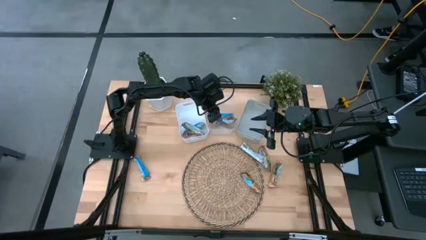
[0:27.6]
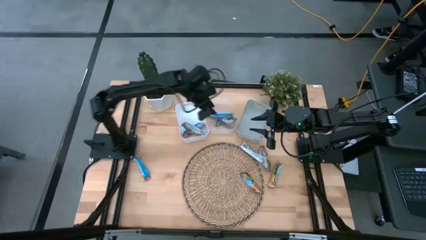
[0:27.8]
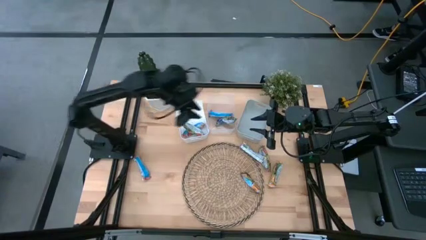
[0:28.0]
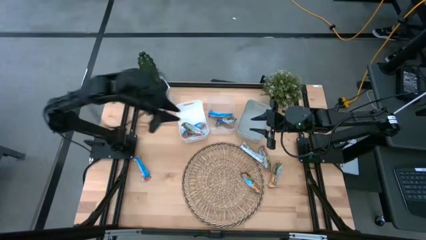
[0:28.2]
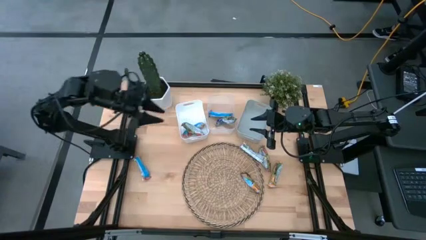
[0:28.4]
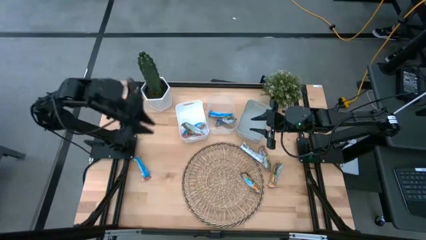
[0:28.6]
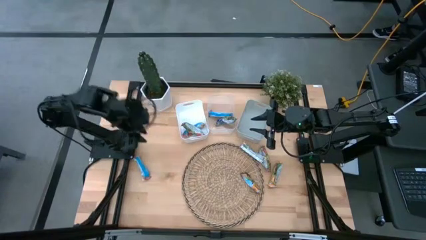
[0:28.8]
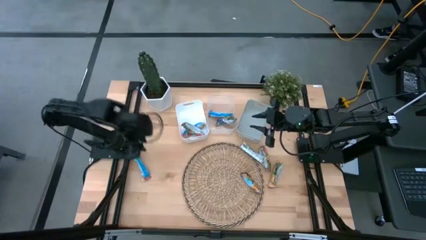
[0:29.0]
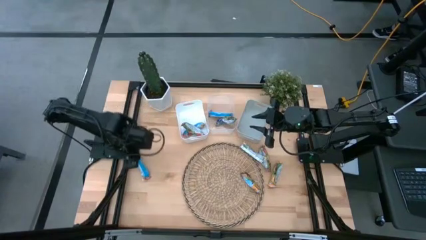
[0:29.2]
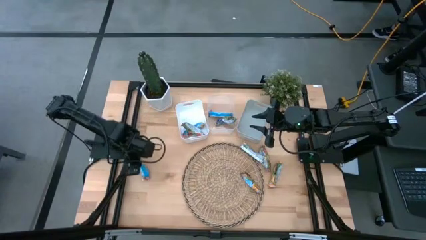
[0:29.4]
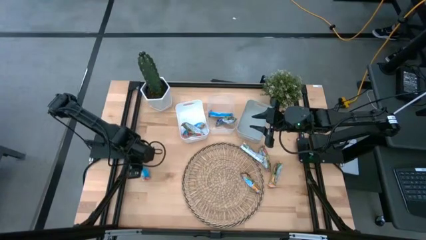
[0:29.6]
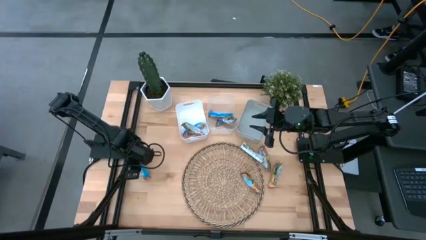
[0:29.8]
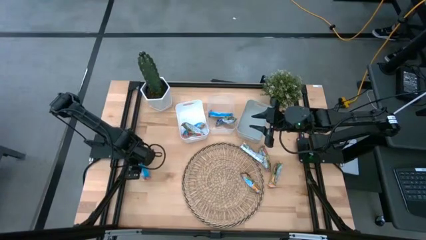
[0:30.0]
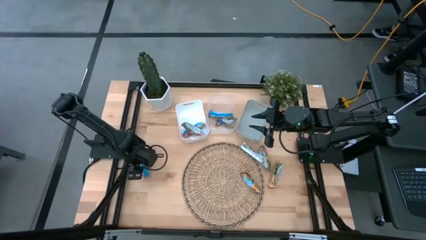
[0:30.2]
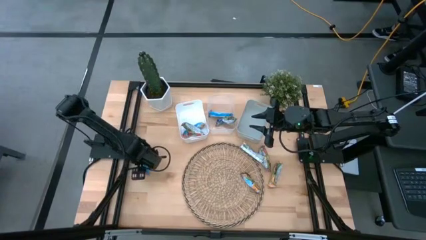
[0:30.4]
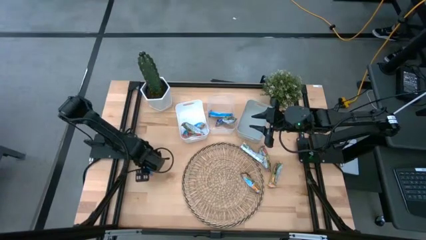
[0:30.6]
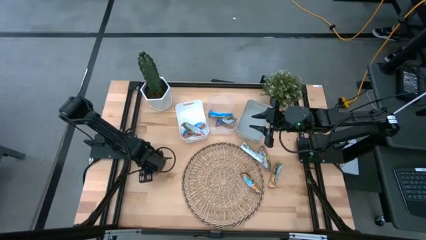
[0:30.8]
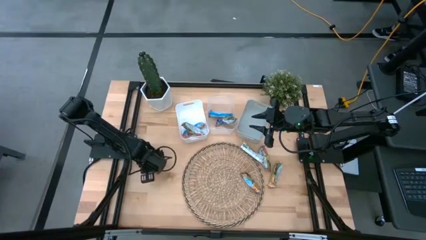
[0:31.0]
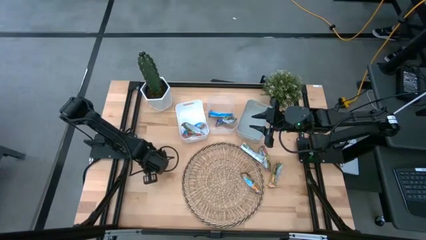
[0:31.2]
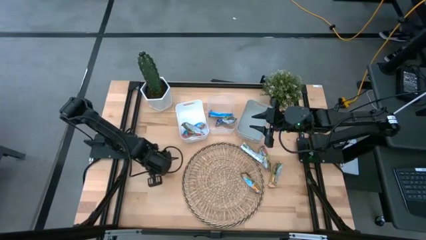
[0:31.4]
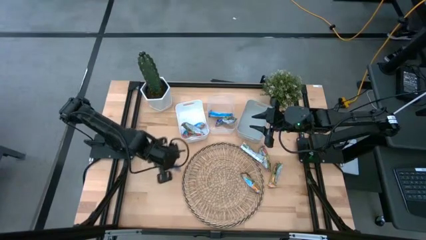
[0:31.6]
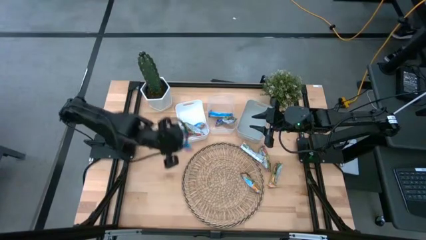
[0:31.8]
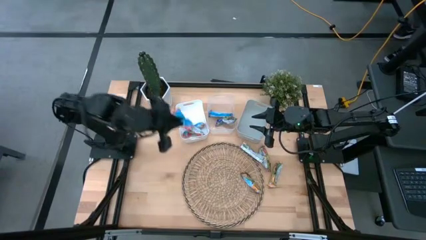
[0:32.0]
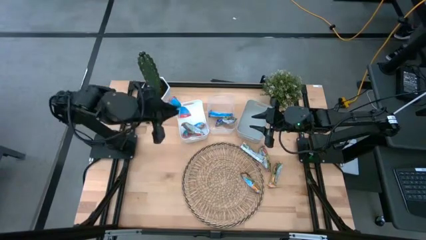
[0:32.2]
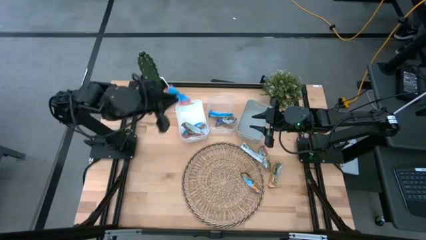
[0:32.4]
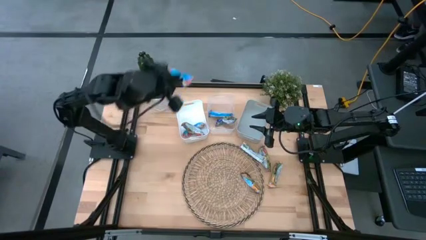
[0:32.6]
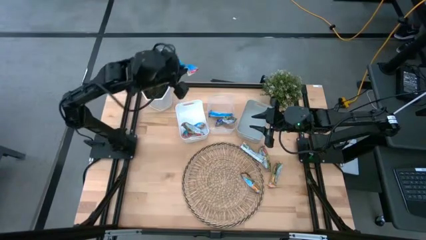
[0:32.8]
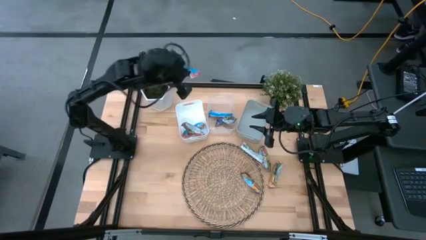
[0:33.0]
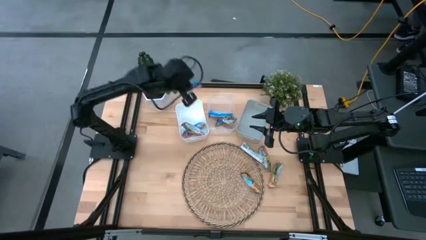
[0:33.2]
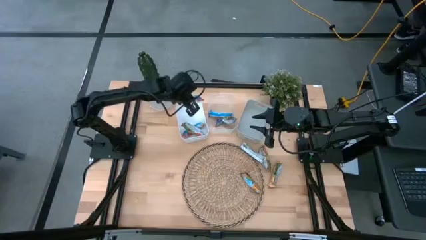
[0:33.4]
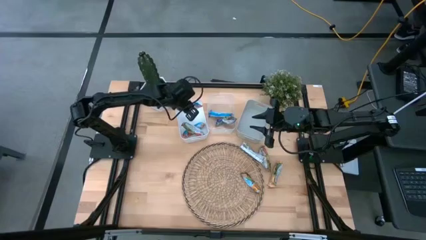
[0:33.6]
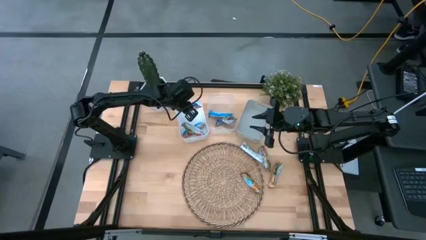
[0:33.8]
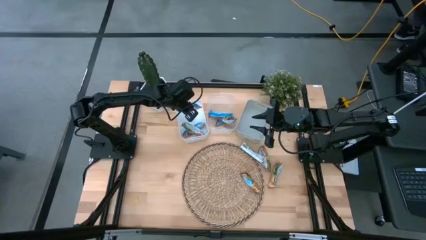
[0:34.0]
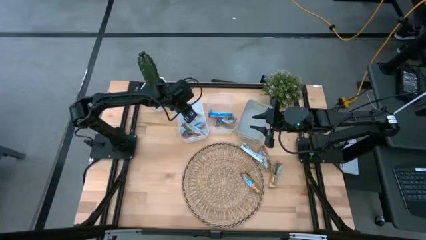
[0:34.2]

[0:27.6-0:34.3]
Task: Pick and place Granola Bars by type
Put the red granola bar into the white bin

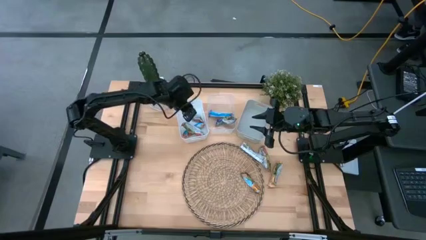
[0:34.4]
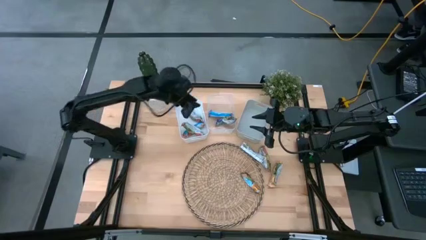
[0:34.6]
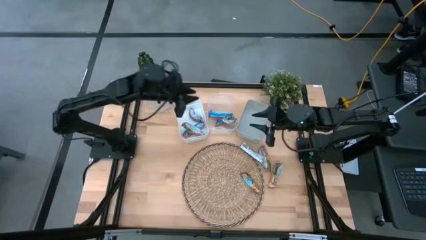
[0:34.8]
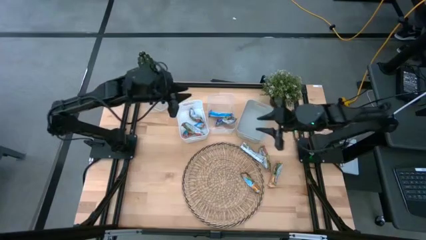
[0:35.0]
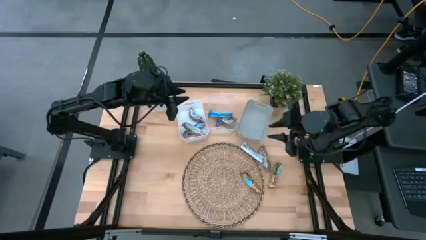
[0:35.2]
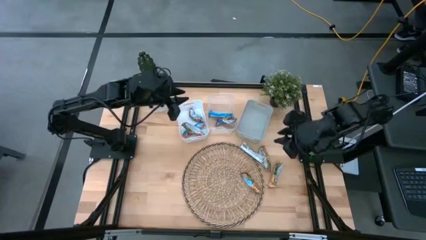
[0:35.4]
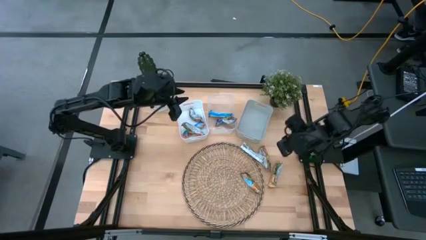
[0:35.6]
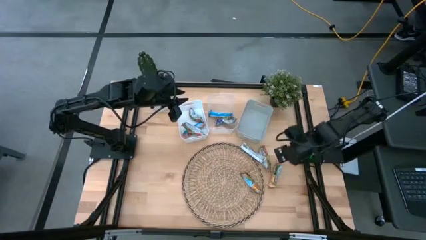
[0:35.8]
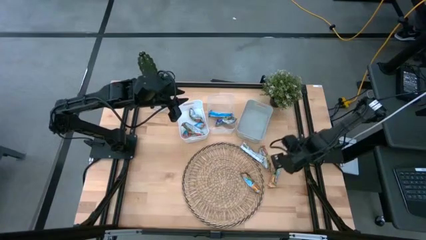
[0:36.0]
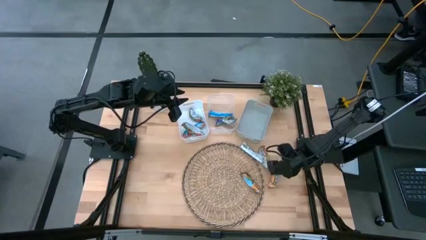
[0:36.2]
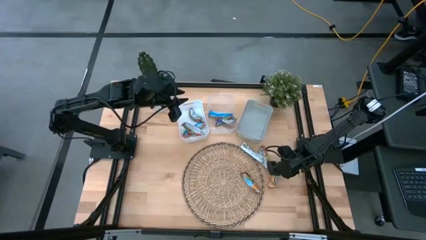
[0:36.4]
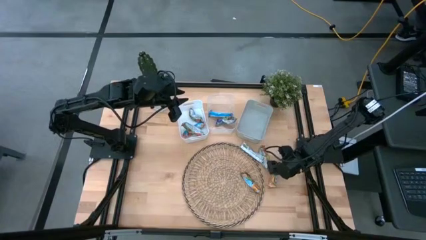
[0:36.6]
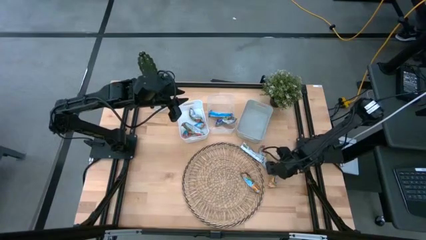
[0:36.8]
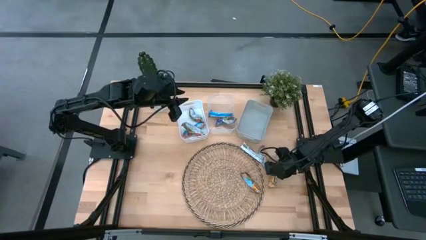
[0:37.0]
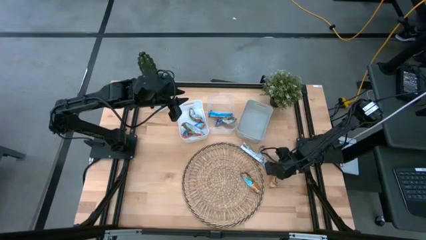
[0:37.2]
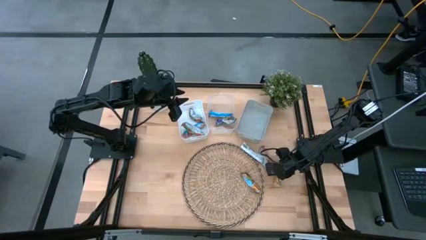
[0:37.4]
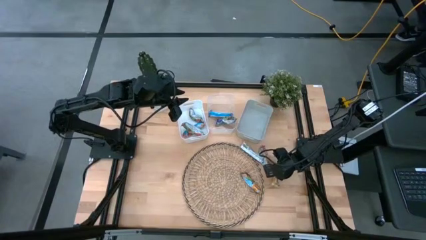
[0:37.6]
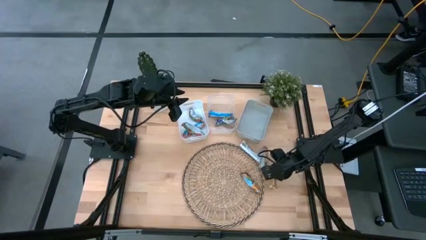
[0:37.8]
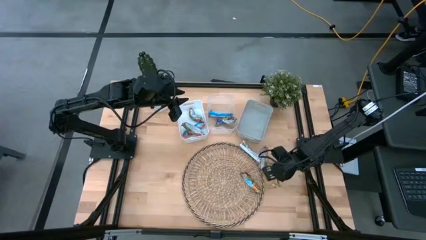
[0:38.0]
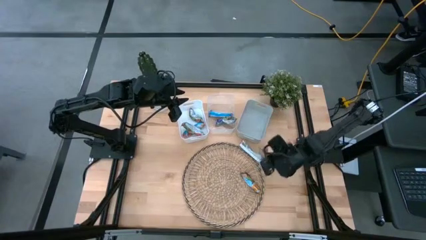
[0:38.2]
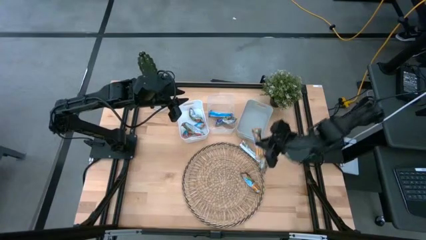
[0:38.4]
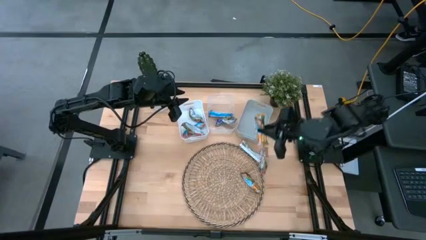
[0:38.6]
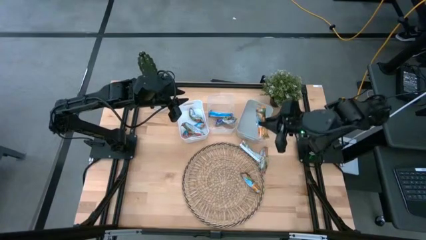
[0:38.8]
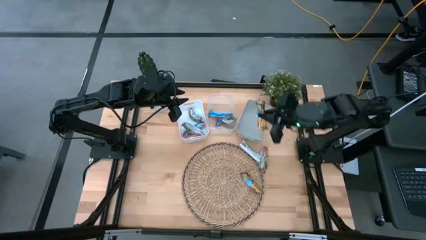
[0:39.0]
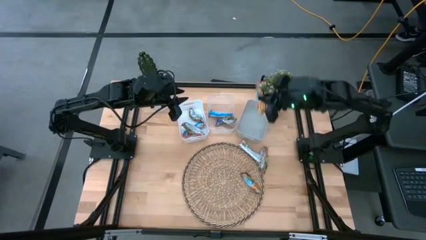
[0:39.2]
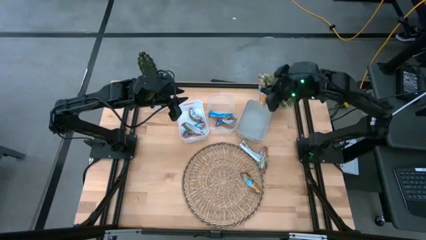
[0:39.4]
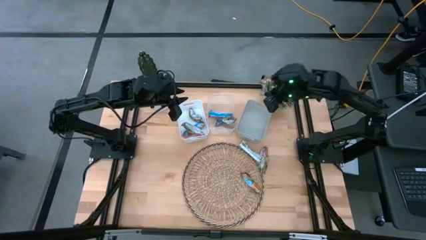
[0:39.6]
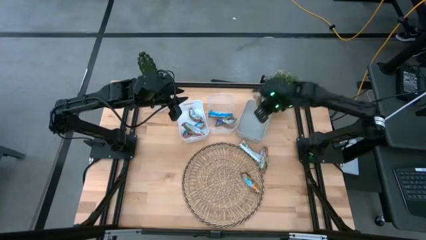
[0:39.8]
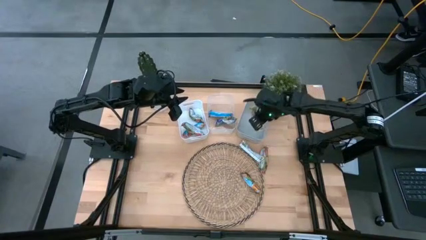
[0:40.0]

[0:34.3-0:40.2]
Put the yellow granola bar into the gray bin

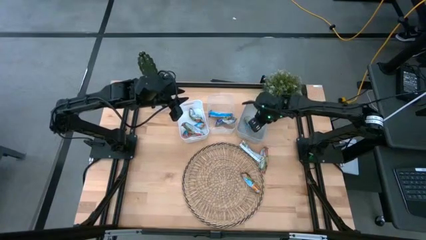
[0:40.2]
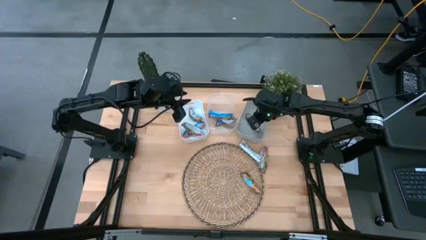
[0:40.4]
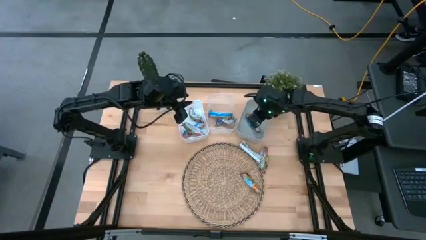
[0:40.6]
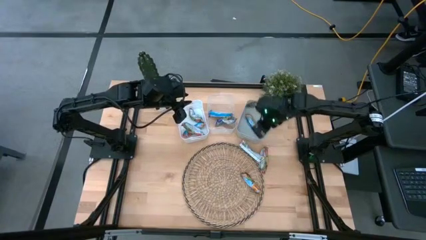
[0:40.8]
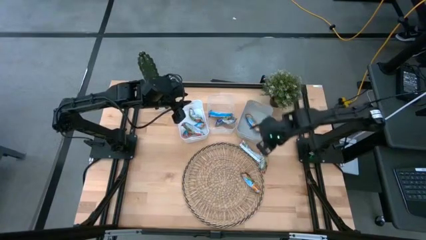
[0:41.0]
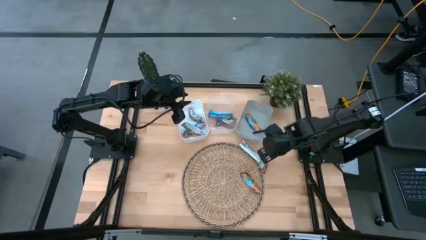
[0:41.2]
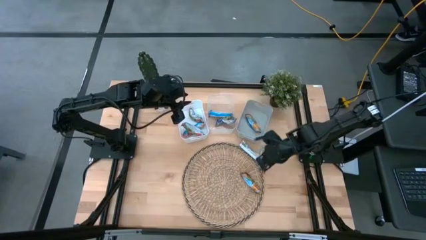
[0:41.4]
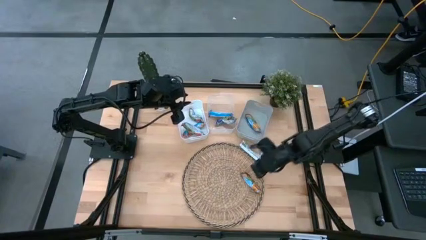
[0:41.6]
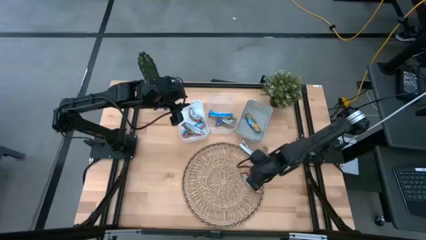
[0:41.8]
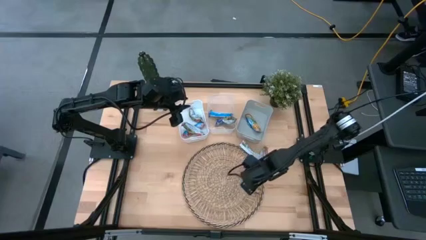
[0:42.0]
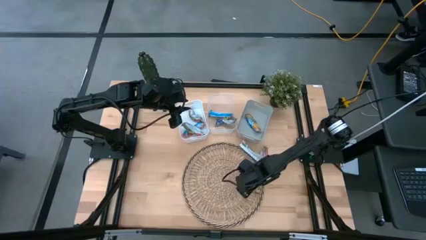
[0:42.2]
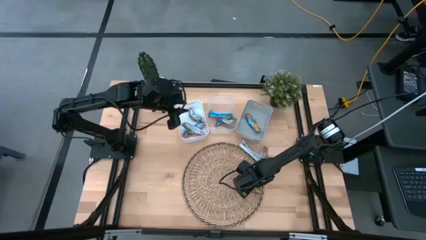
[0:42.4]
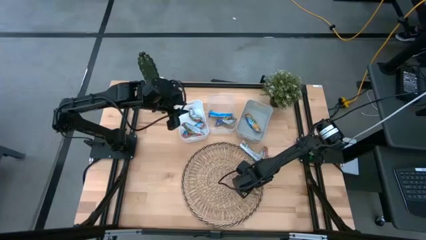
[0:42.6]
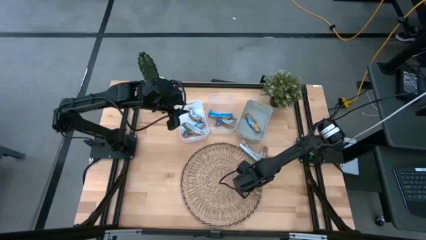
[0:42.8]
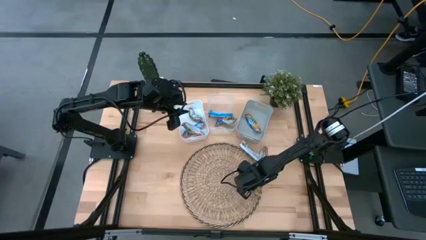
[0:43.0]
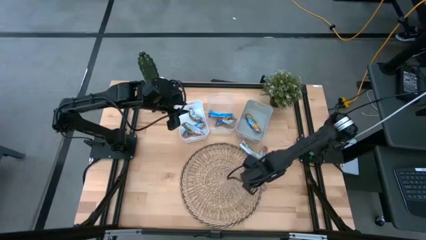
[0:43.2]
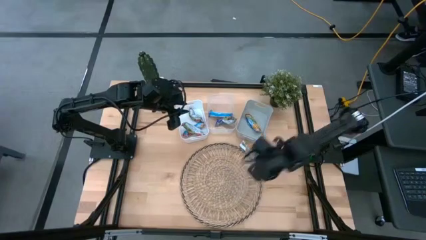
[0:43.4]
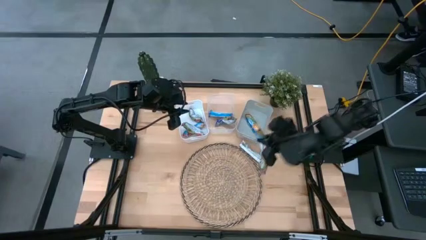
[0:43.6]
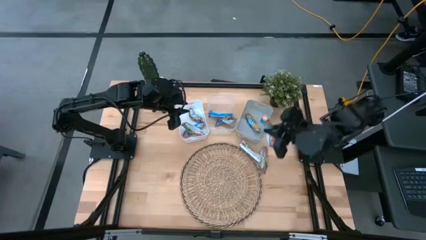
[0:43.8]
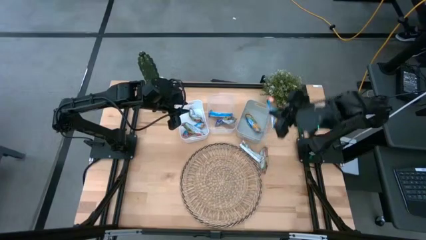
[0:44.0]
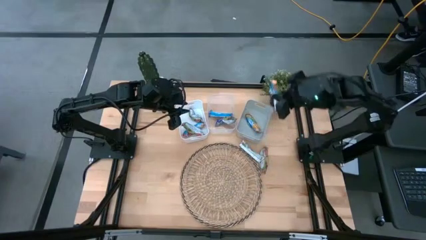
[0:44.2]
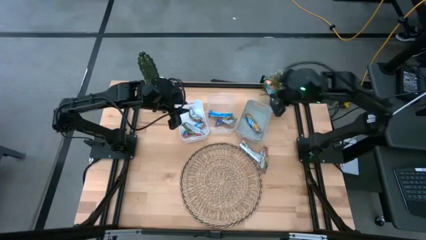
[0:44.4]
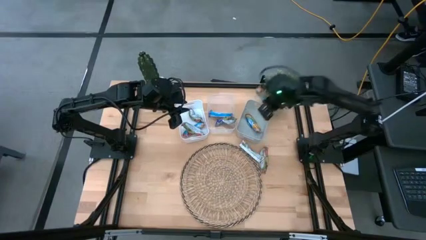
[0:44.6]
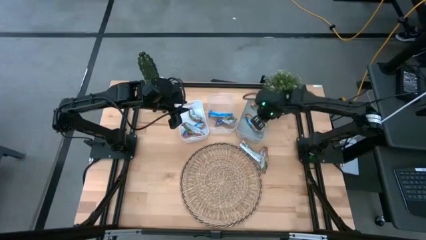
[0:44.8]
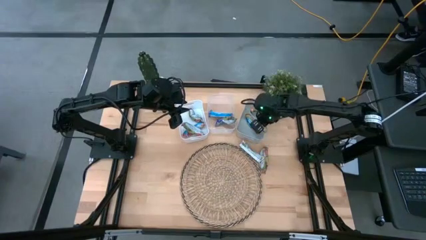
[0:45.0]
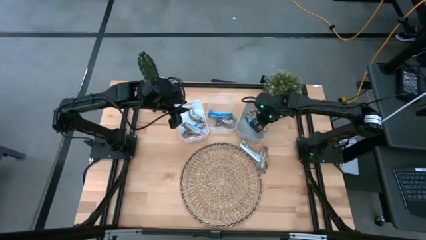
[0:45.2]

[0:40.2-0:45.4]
Put the yellow granola bar into the gray bin
